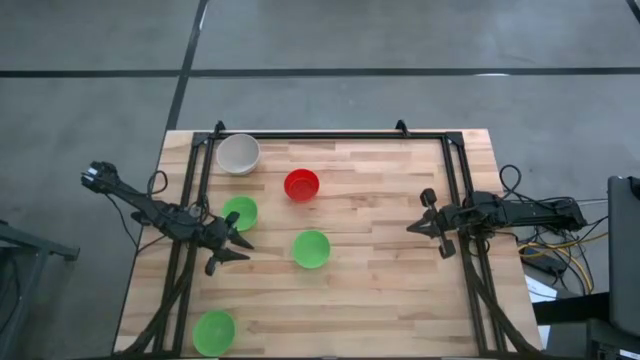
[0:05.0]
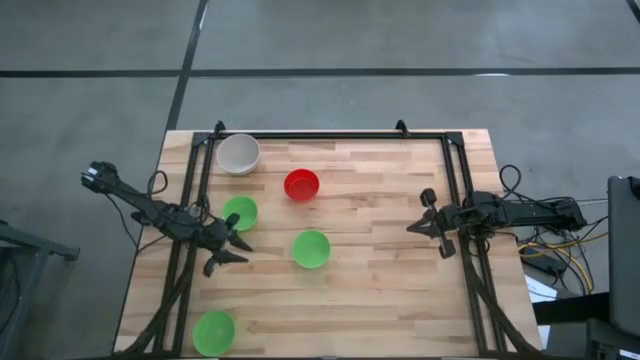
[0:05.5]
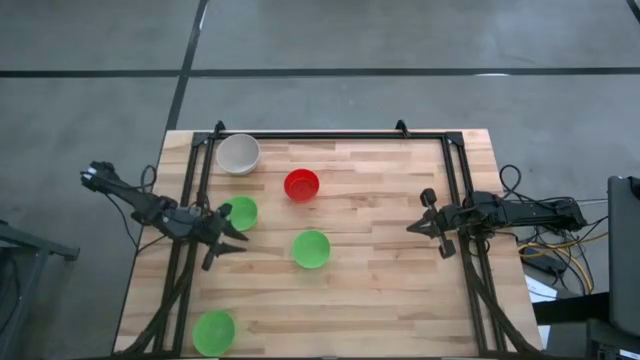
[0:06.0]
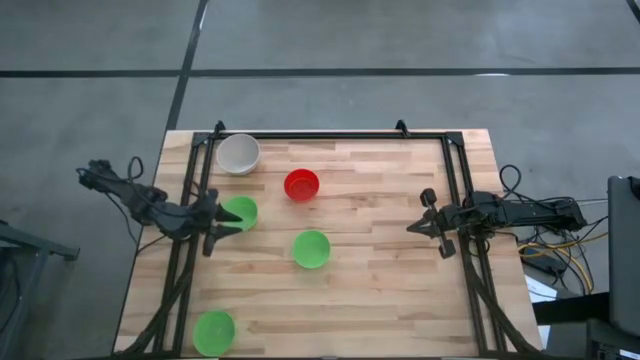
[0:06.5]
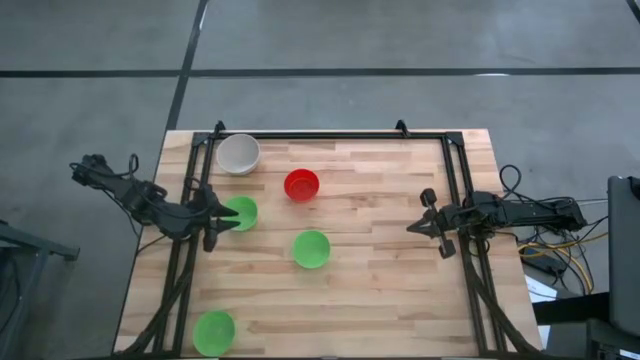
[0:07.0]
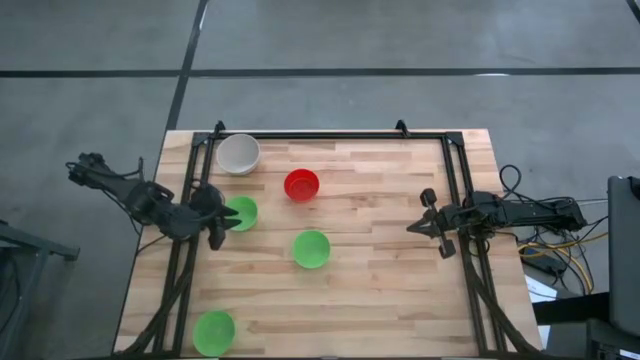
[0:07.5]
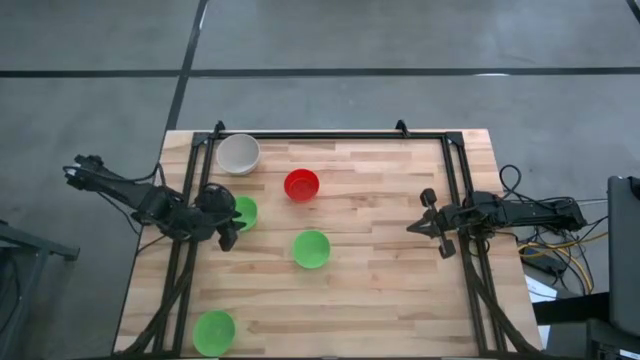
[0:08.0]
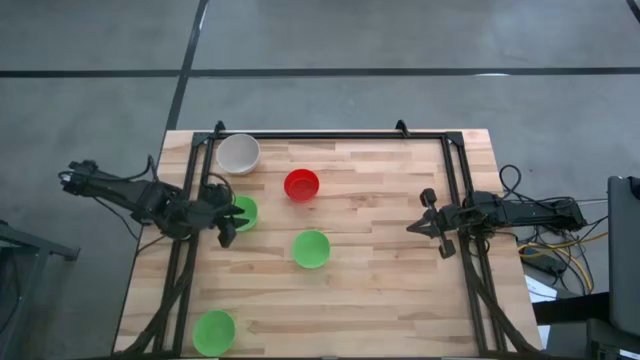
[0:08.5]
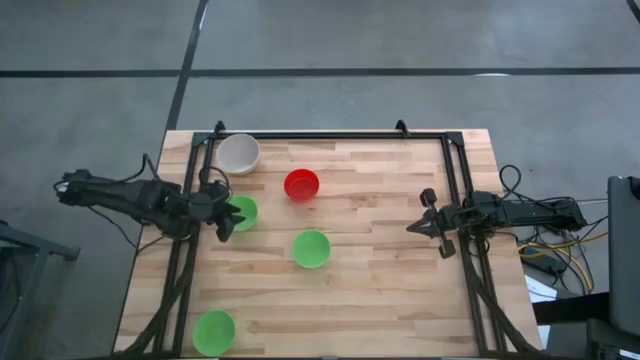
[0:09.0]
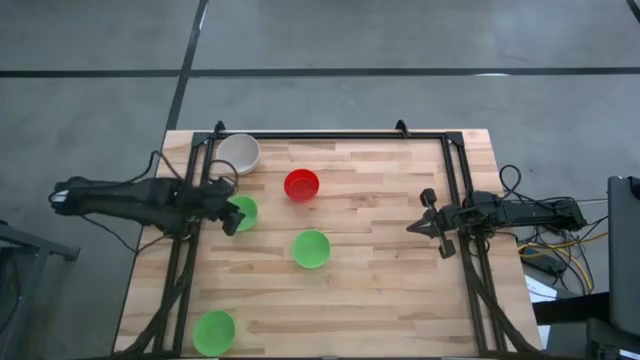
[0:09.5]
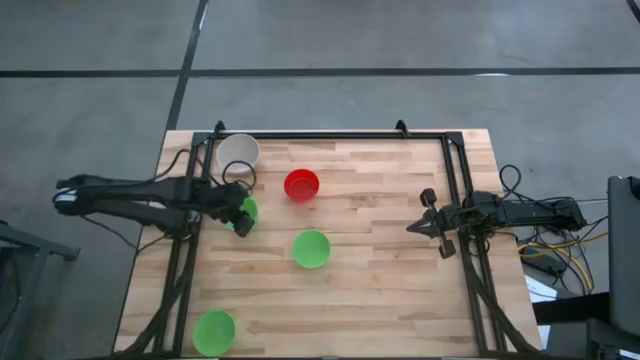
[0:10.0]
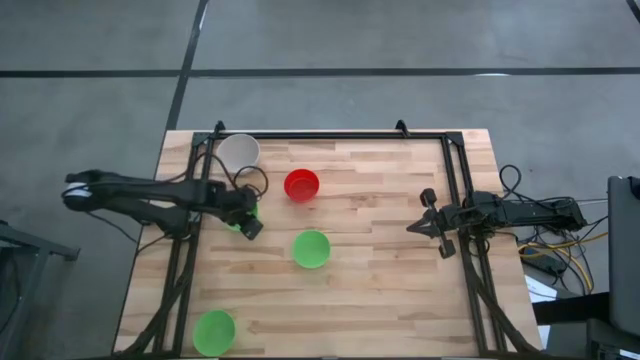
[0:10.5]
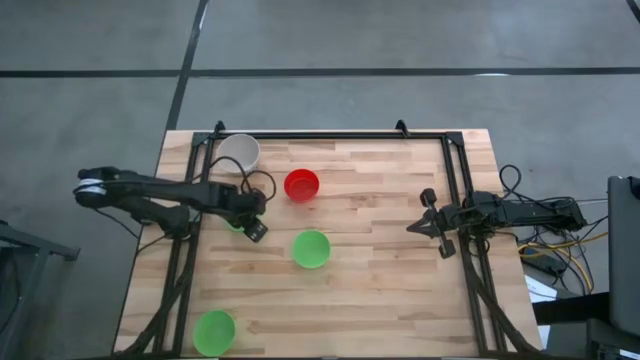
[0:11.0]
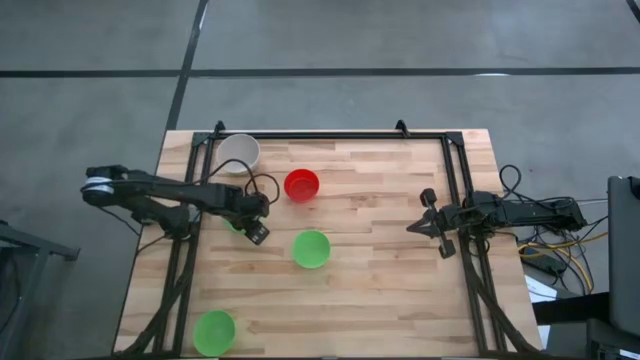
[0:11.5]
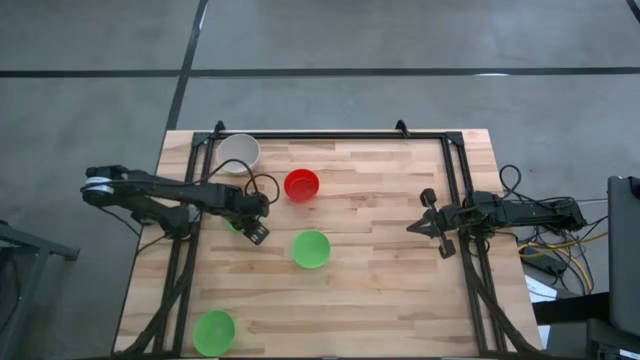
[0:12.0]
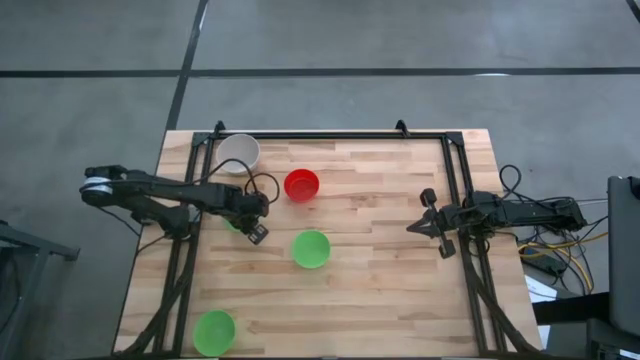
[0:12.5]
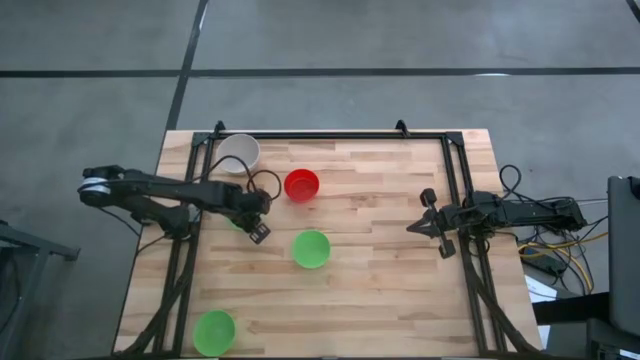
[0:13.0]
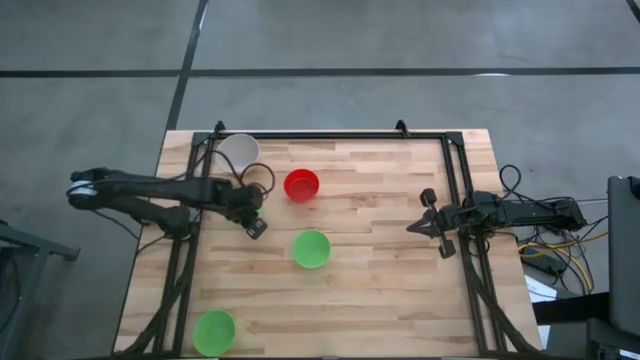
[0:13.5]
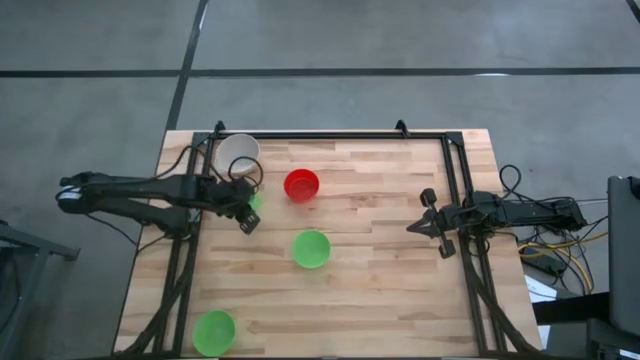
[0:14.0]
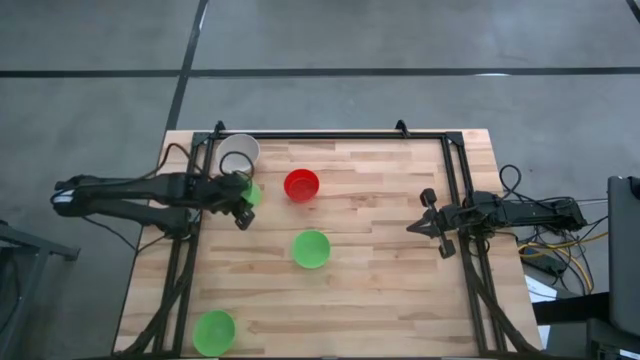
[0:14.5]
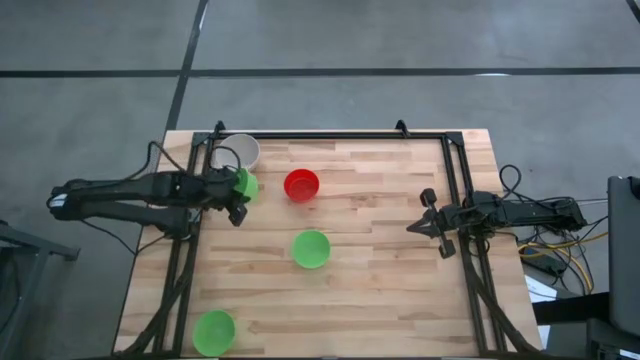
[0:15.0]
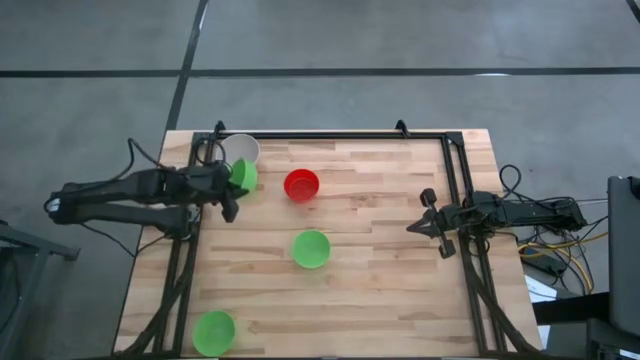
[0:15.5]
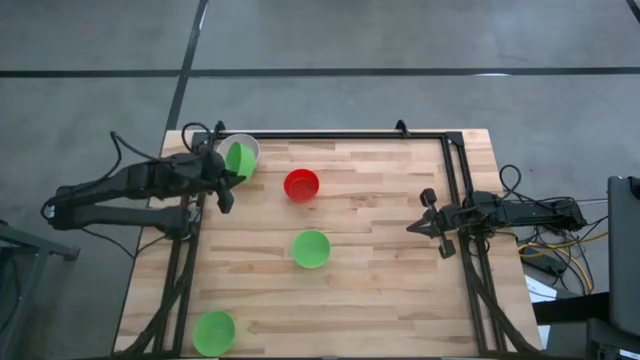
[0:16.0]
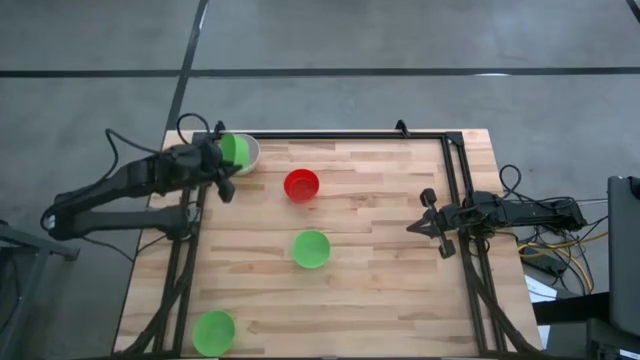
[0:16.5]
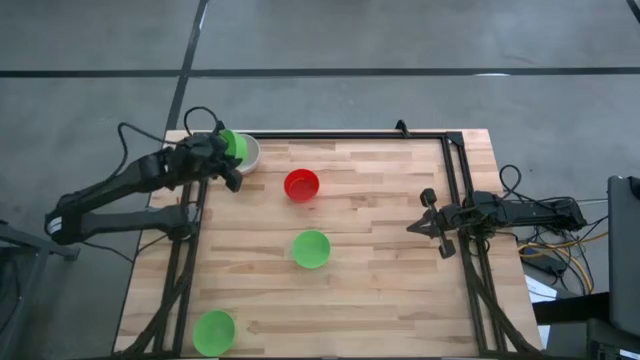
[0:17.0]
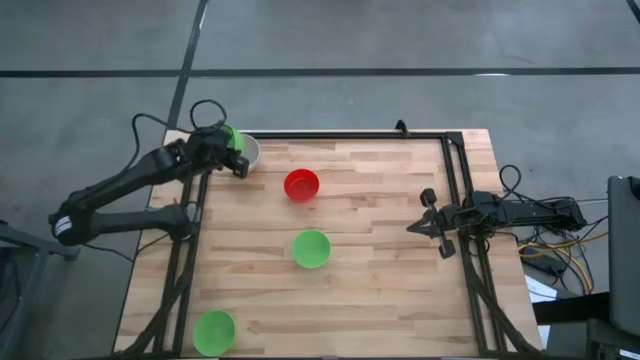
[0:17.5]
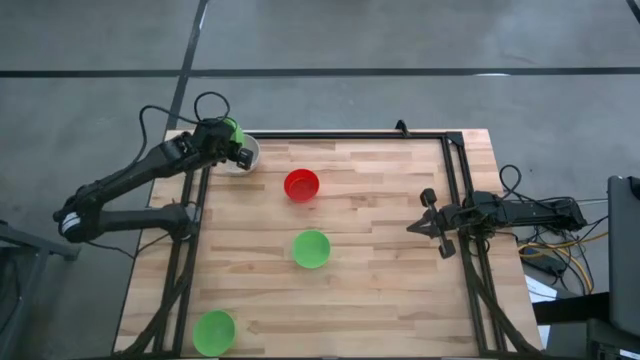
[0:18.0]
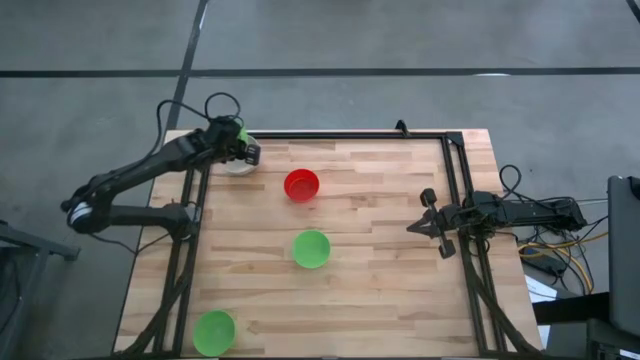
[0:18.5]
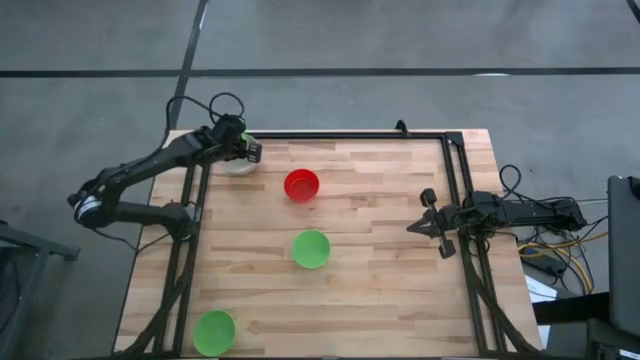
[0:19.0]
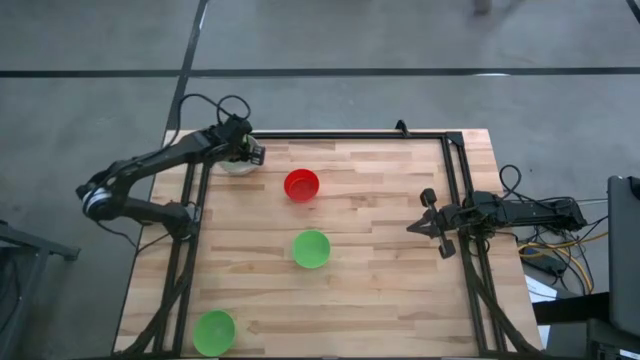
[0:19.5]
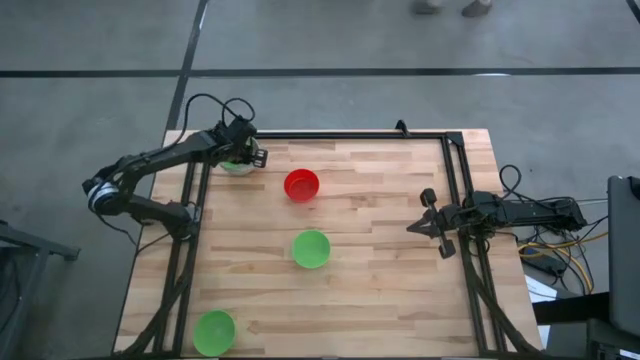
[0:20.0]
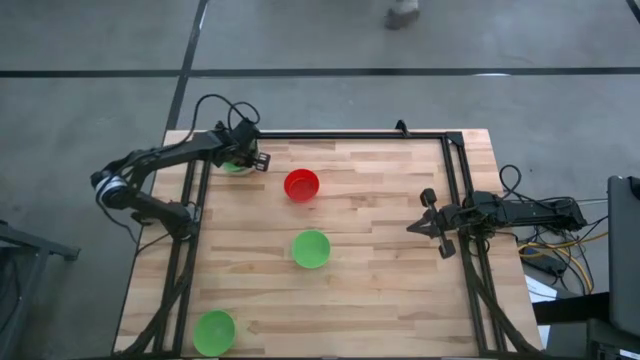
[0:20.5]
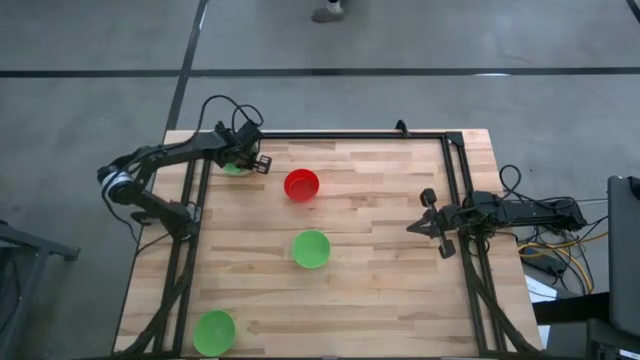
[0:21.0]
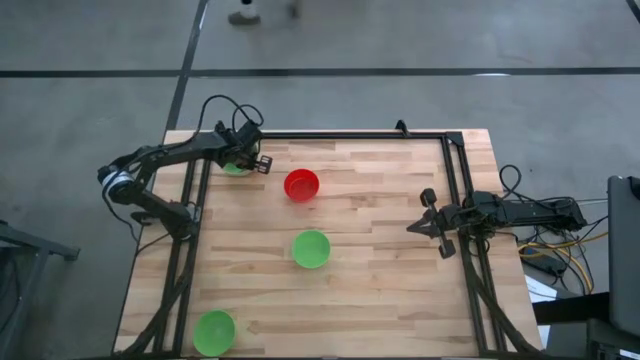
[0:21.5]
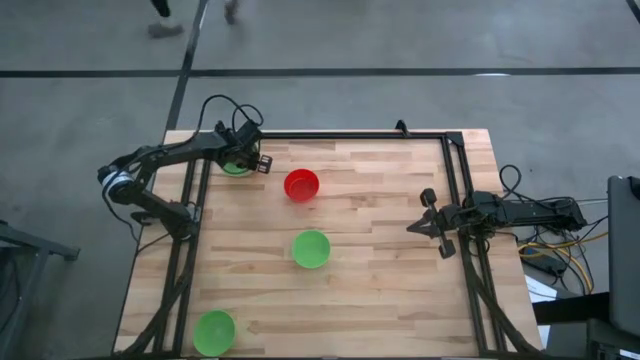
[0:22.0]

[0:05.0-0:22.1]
Stack the top green bowl on the white bowl
